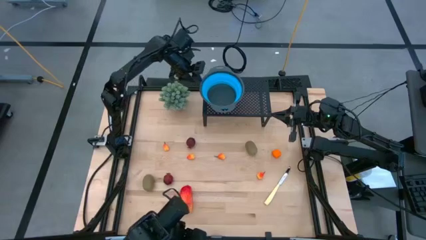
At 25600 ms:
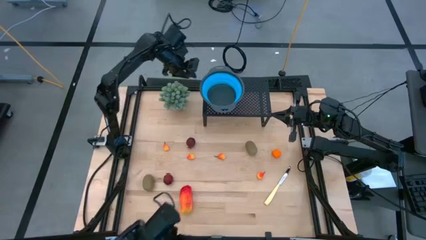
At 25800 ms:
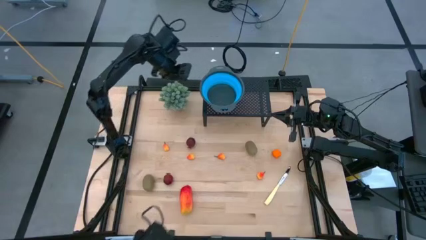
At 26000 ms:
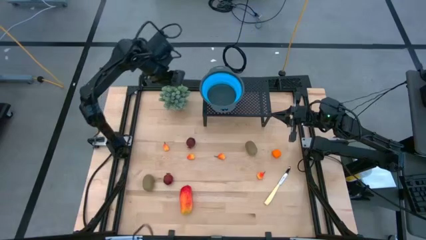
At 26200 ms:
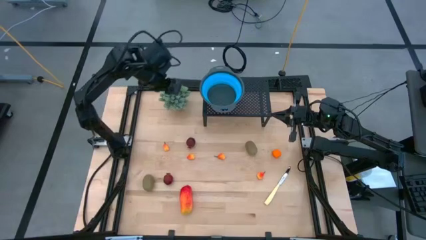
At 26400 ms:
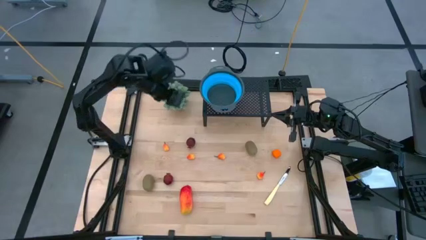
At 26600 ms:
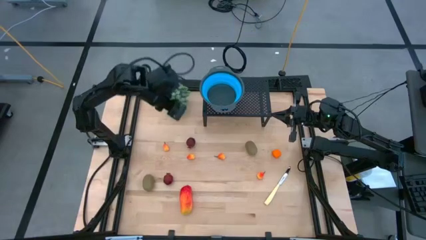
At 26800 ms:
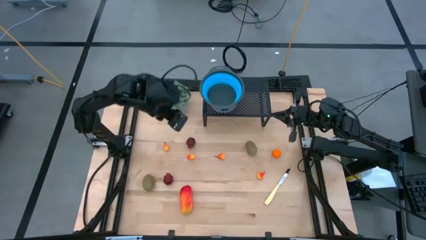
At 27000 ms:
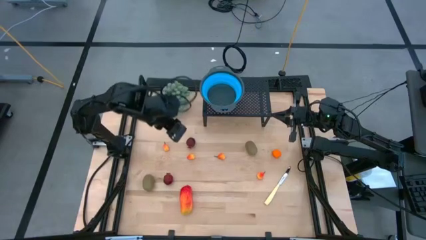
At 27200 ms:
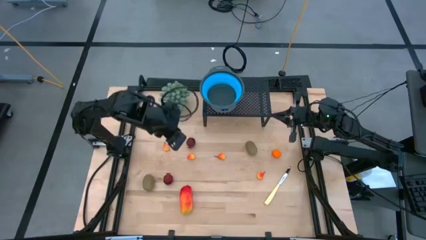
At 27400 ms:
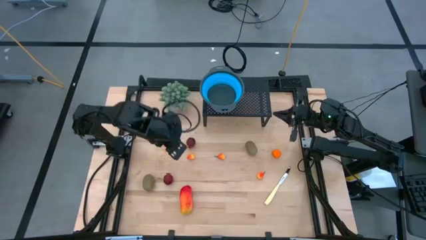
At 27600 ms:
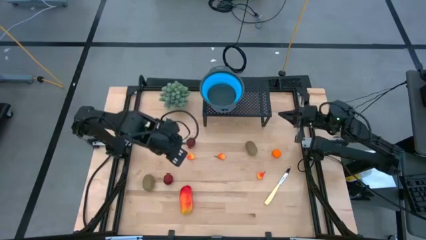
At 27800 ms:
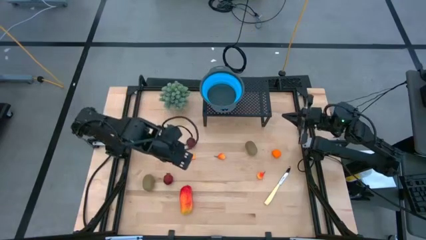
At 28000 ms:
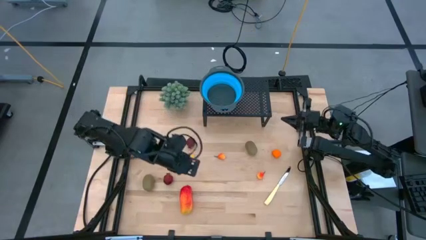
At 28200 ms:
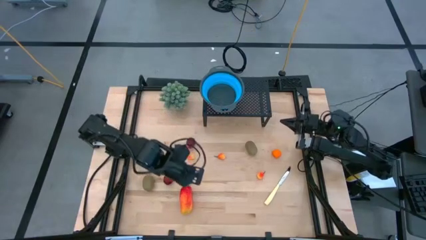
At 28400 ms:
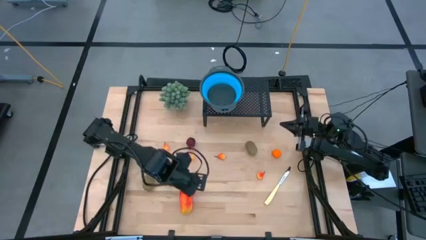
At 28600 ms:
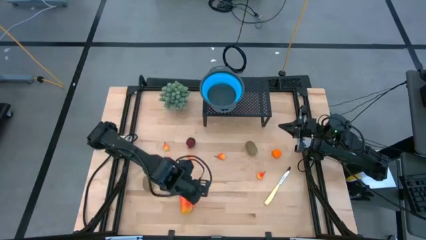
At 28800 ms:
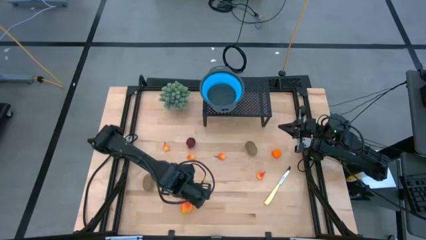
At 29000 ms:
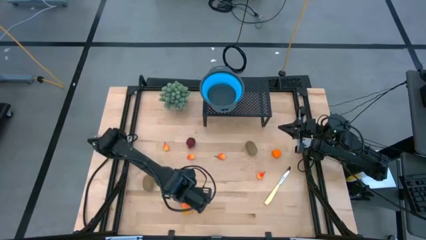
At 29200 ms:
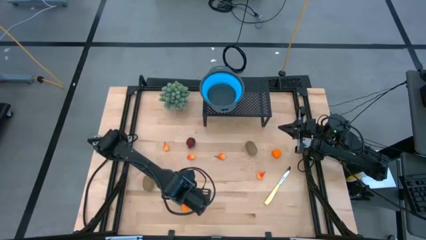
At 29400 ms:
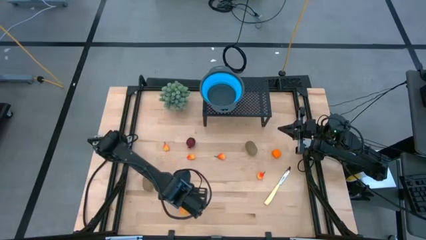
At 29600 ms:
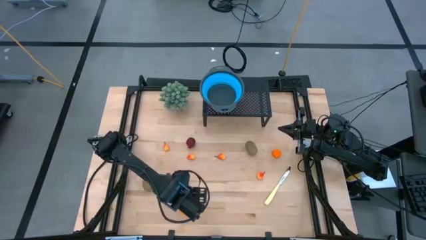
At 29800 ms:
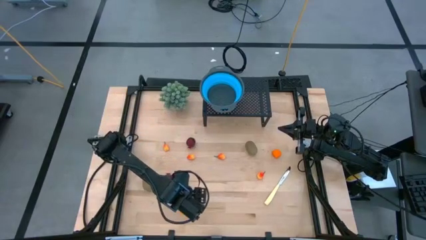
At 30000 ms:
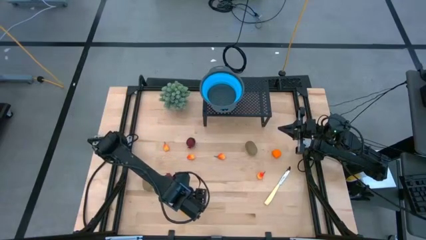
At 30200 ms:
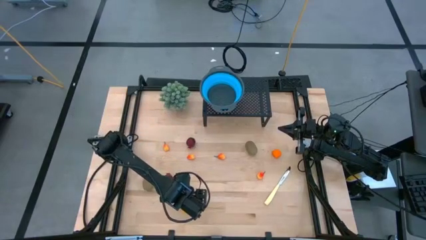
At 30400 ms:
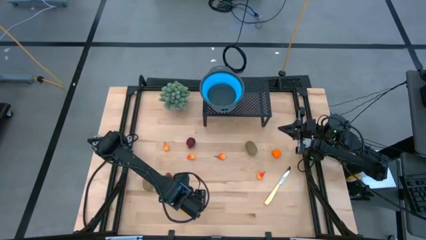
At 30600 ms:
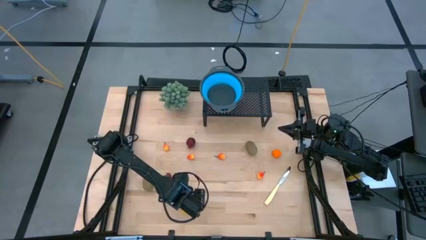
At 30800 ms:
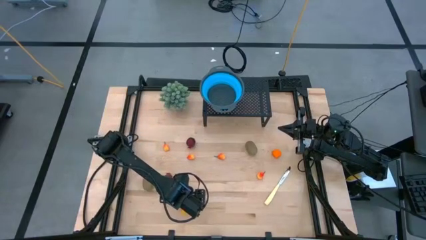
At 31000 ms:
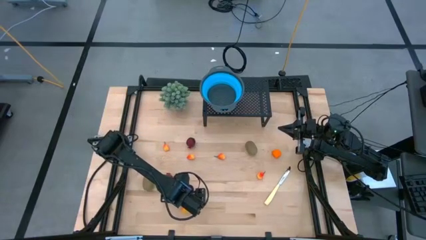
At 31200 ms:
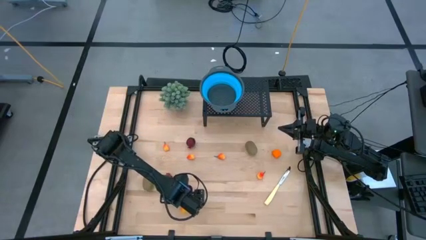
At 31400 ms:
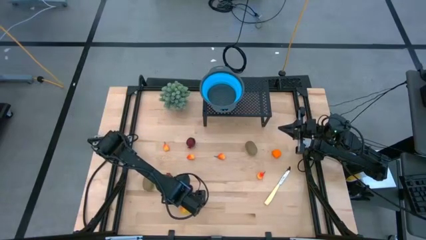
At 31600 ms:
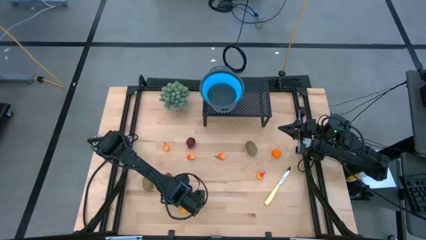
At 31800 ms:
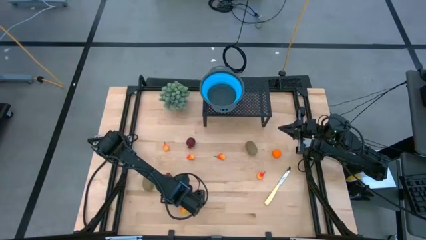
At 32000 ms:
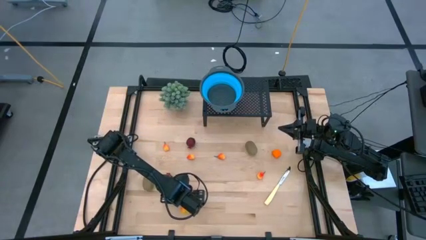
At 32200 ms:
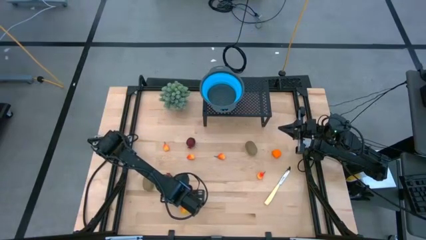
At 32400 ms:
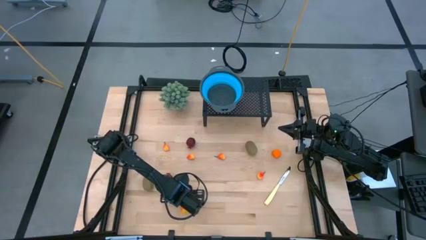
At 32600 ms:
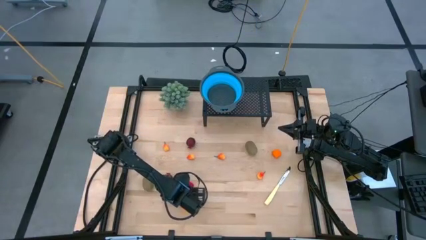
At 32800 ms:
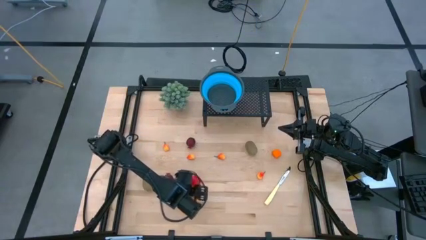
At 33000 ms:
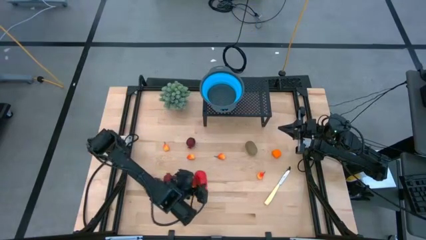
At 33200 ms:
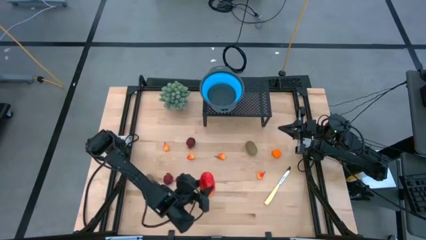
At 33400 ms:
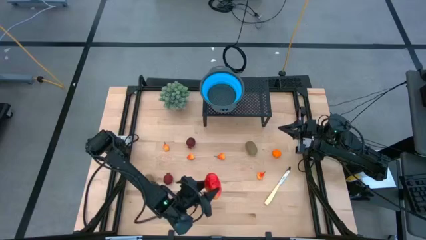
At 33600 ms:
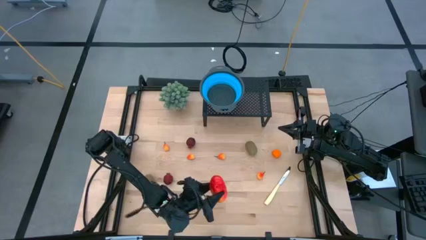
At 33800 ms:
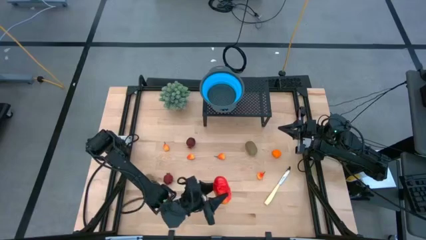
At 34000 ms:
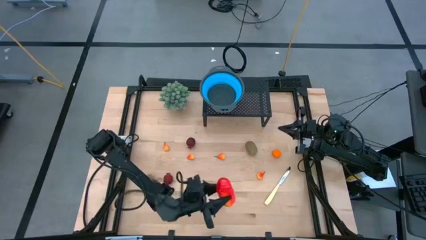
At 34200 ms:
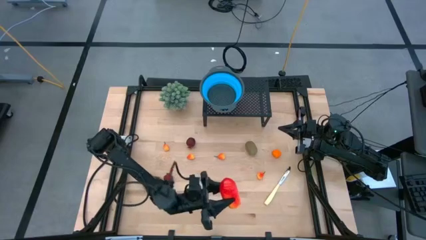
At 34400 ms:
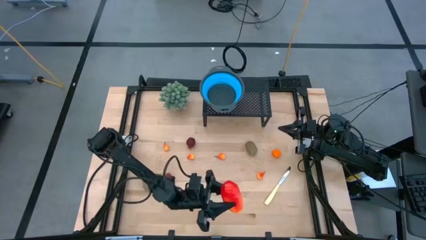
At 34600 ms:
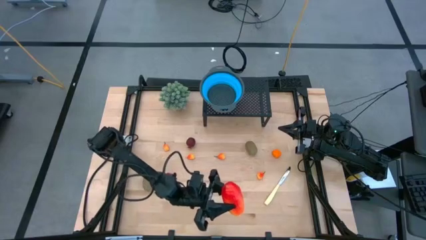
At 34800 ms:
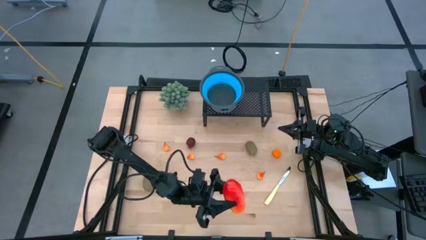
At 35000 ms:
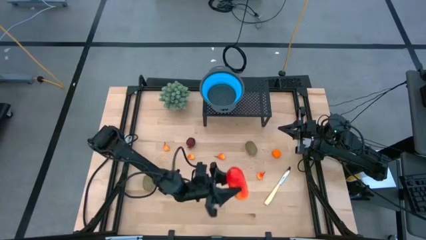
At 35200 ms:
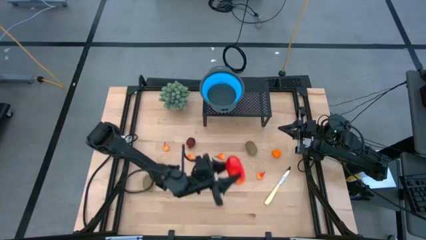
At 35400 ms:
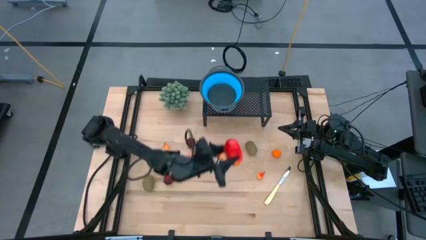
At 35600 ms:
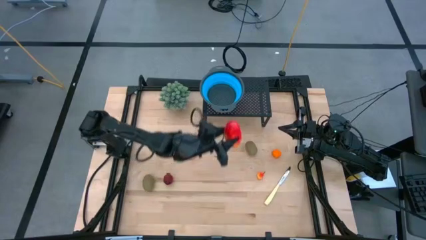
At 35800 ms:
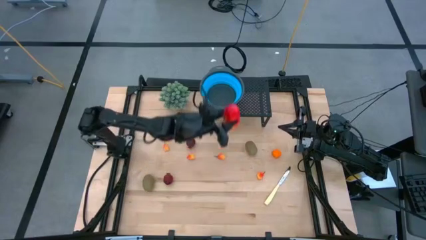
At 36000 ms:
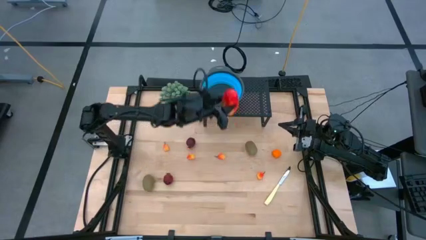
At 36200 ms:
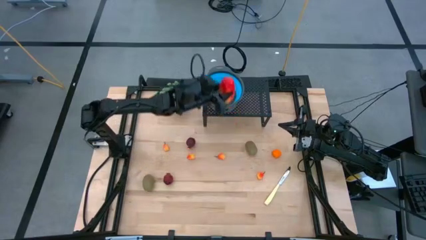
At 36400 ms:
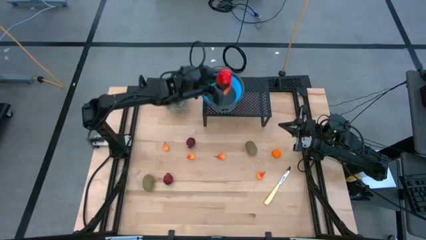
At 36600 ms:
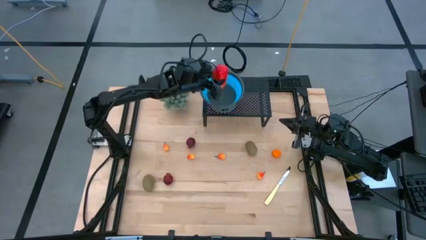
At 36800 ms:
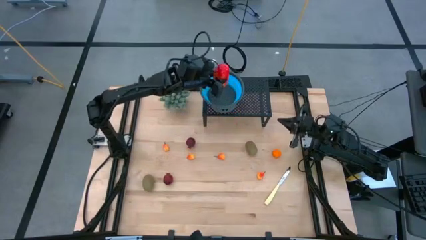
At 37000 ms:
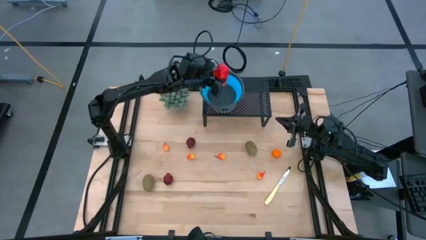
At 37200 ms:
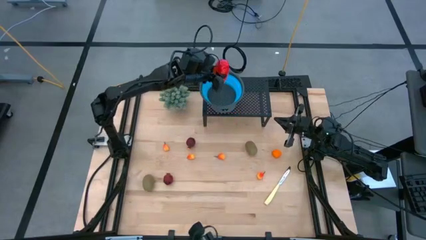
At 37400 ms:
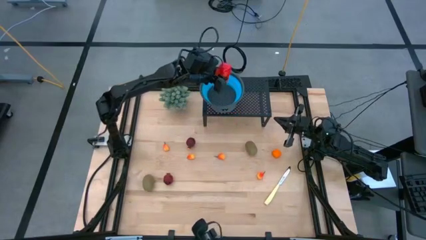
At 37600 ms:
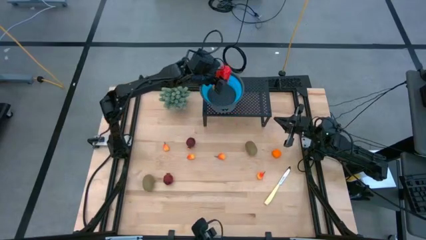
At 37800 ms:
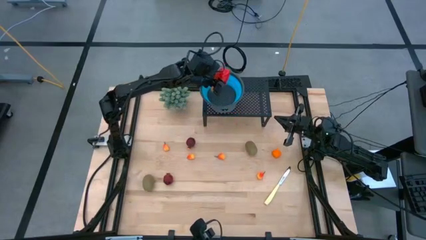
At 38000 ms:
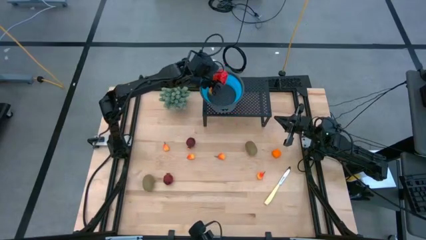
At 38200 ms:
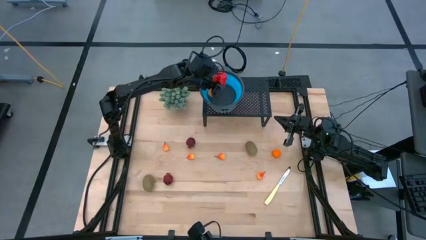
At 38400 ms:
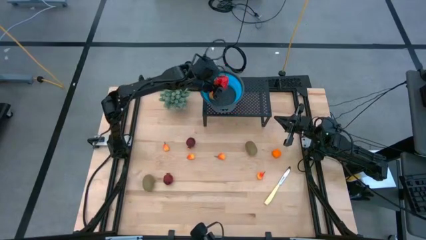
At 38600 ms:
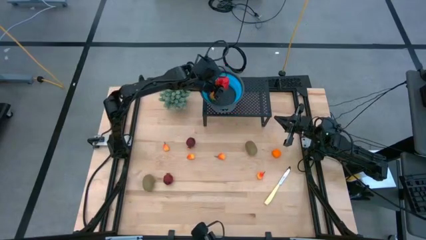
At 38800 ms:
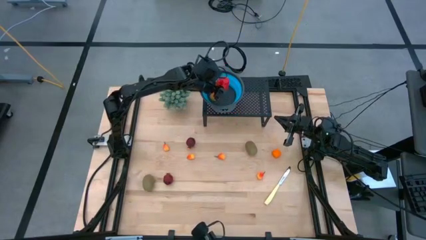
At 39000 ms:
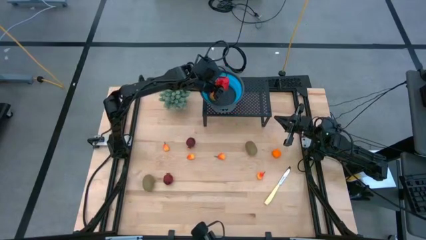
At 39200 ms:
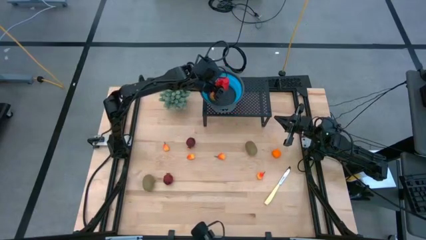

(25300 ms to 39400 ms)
Task: Pick & Place Fruit
Put the orange mango into the blue strainer bowl on the shelf
